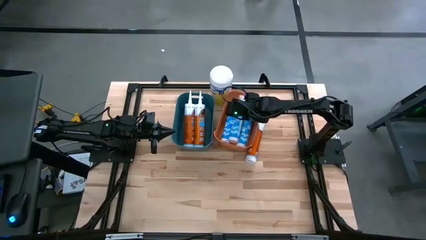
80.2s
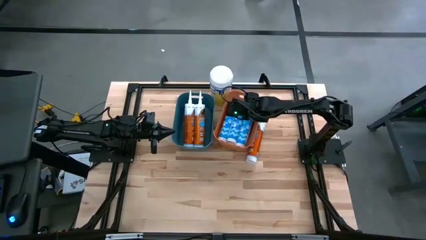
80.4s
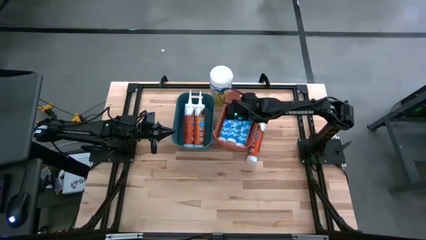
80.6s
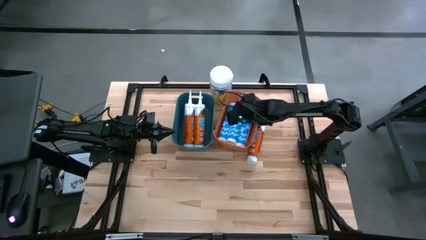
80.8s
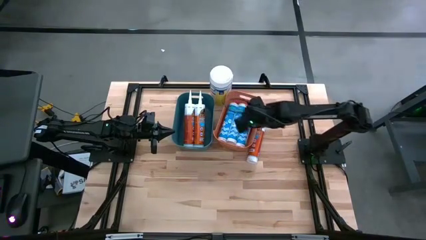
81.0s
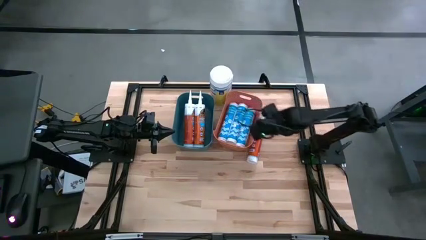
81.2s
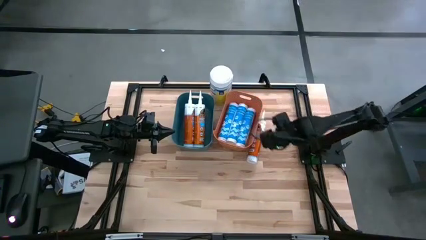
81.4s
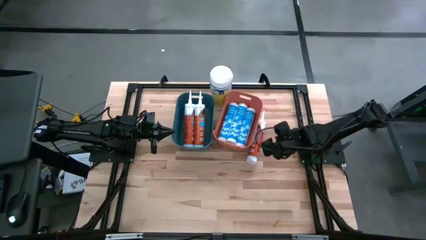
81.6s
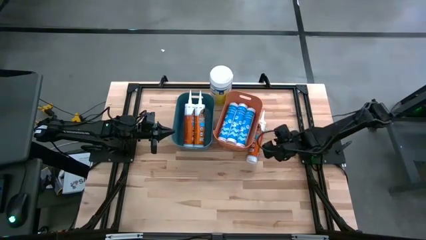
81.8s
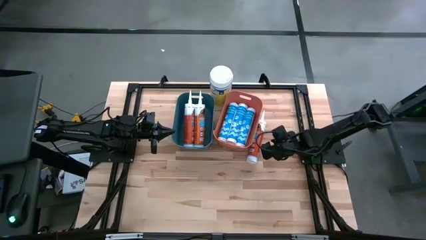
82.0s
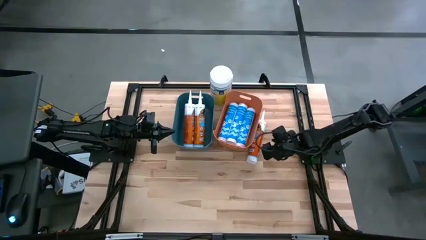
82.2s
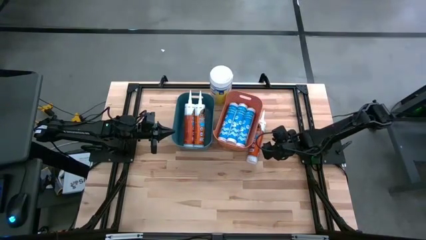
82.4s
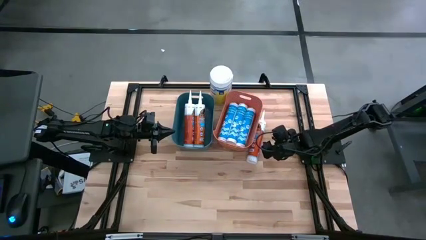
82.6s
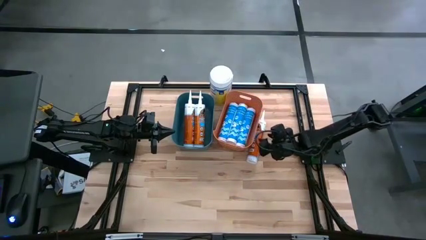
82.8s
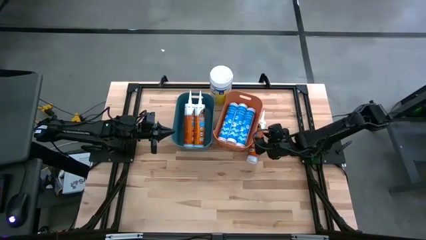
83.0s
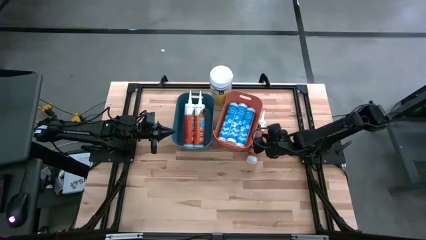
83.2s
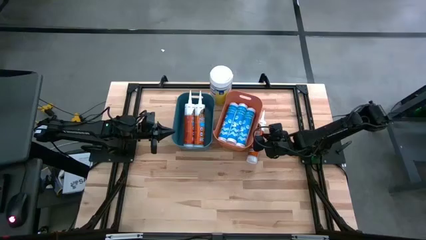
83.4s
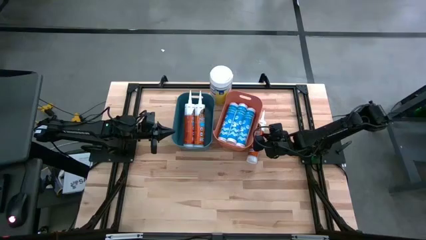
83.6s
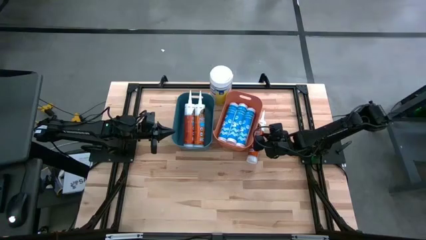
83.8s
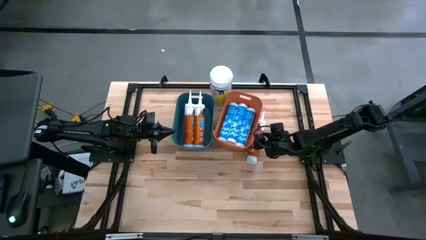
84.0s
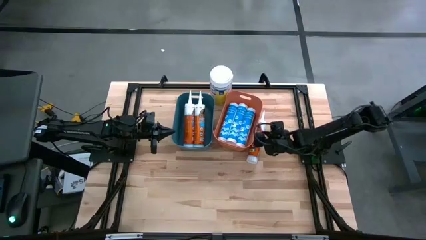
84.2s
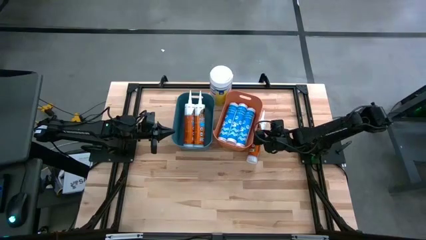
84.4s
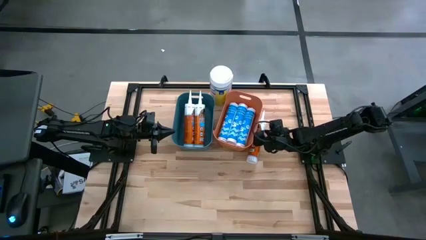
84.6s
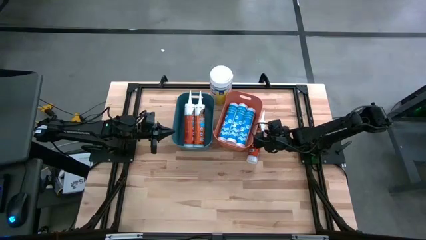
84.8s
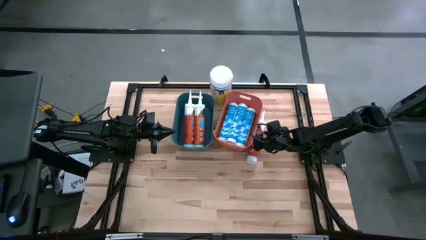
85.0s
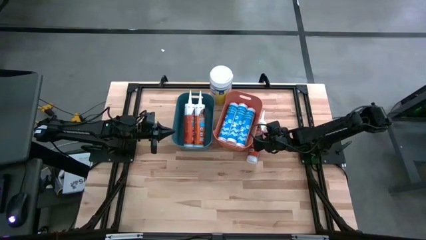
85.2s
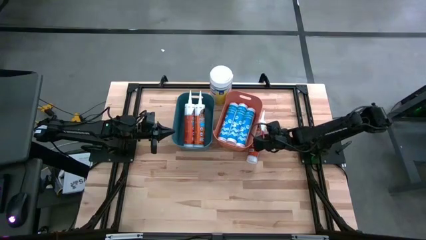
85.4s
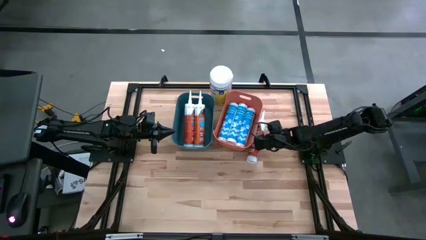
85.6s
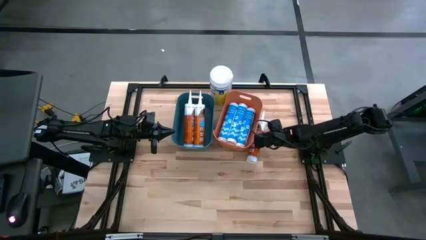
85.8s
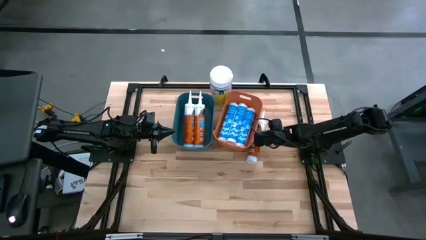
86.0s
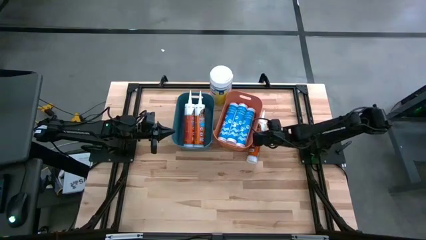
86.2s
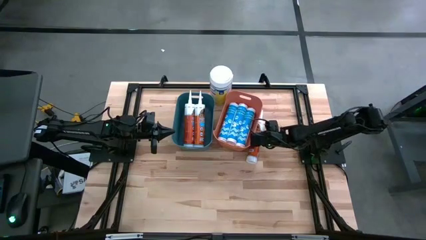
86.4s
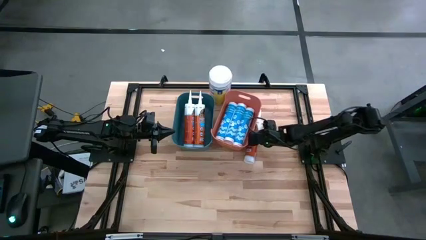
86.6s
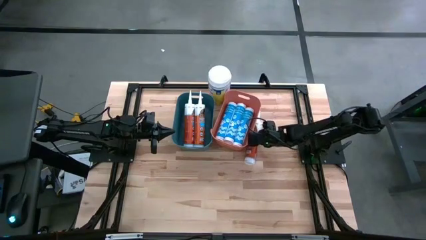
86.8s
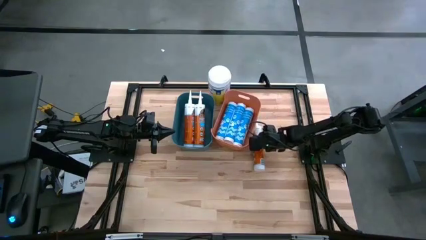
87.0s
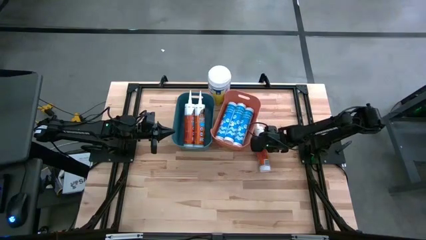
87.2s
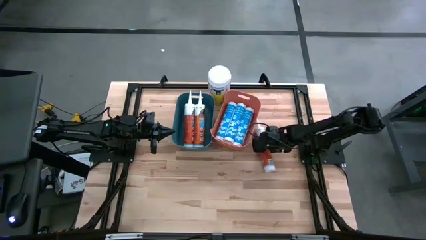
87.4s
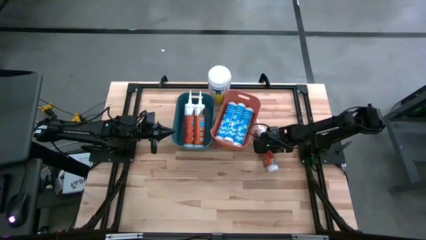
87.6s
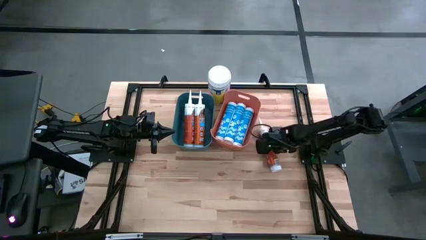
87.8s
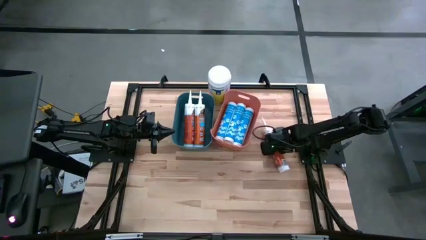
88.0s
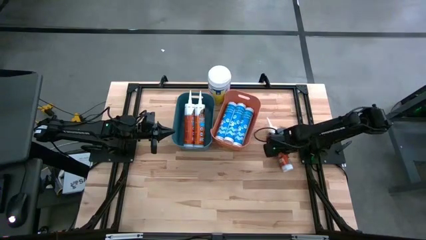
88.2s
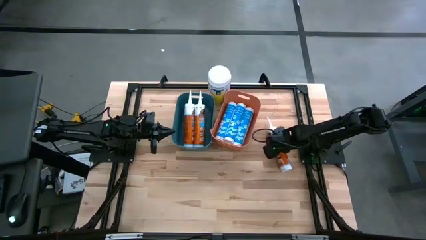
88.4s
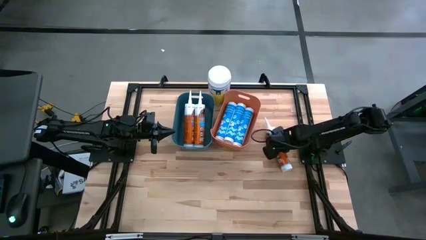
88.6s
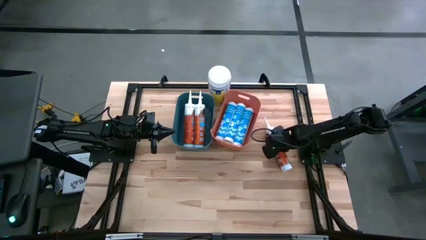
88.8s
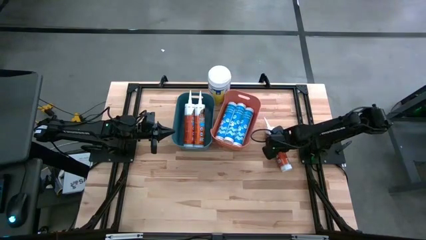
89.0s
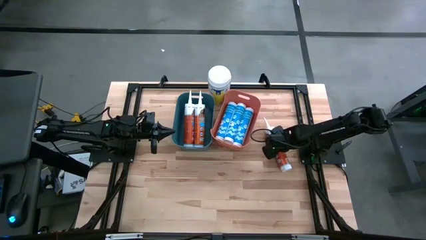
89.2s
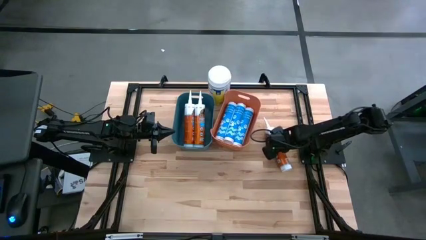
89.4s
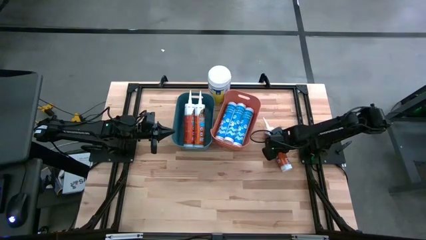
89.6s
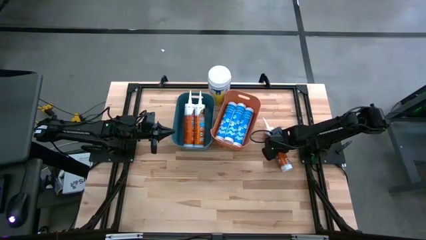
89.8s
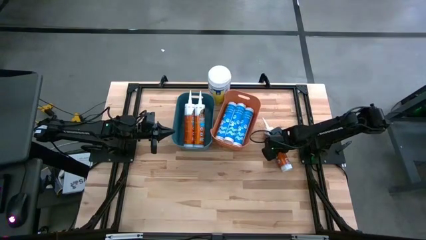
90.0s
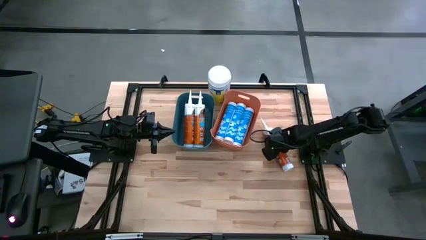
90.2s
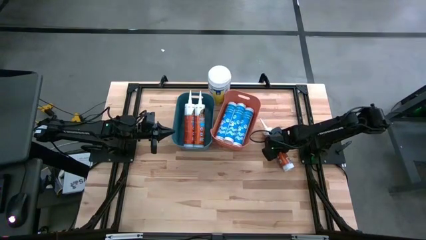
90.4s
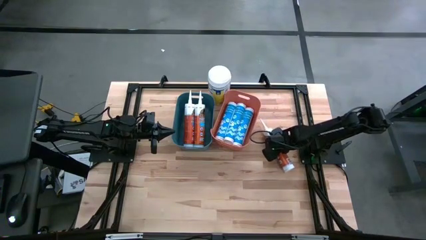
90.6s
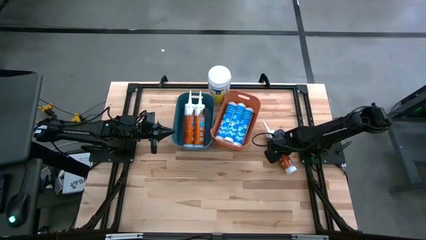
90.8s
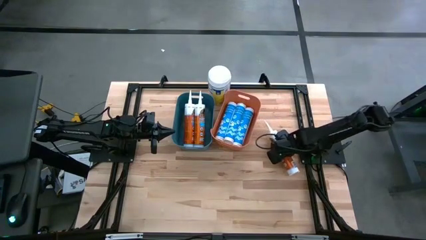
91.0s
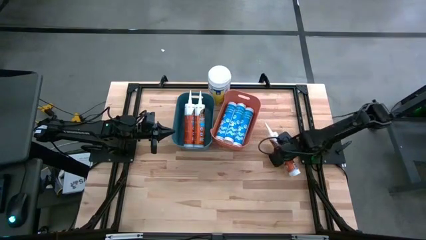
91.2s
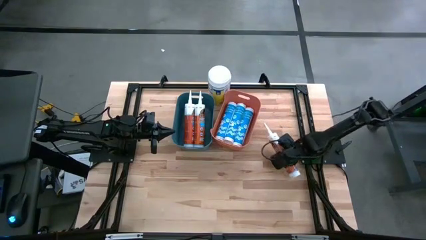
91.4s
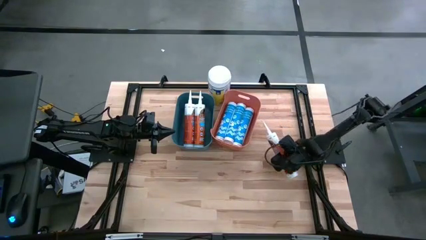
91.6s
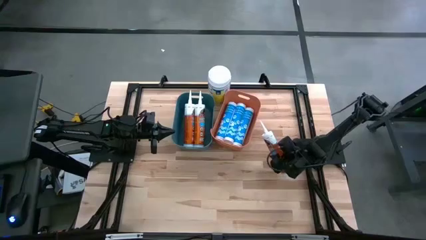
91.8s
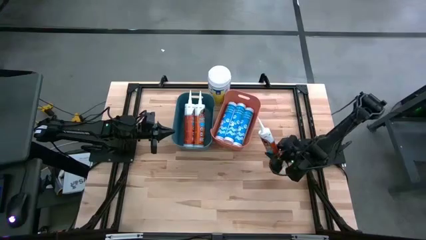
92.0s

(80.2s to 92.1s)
Task: Pick & place silicon tubes, Sealant and Lysol wipes
Put the orange sealant into the blue bin

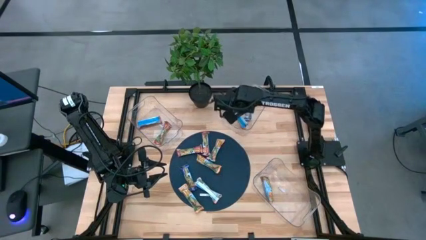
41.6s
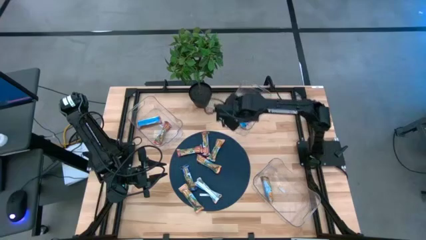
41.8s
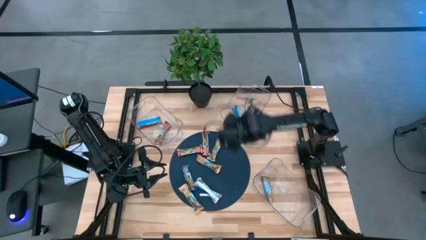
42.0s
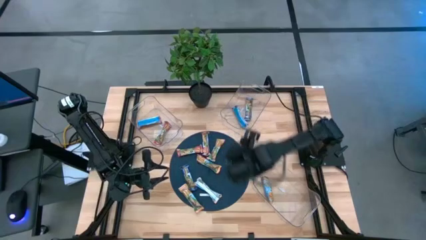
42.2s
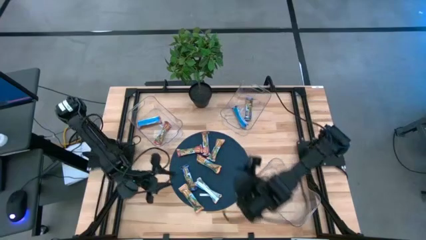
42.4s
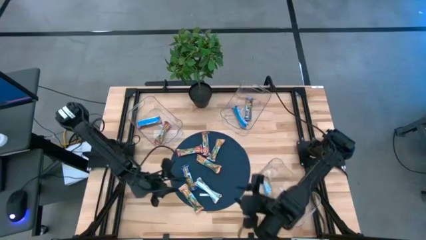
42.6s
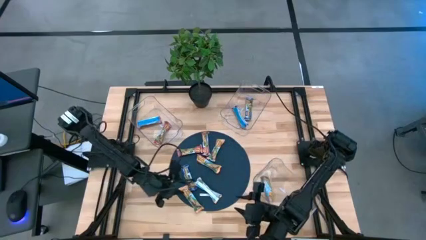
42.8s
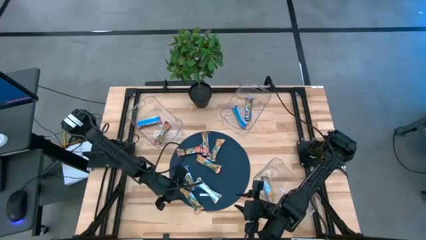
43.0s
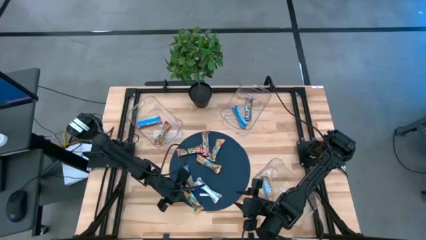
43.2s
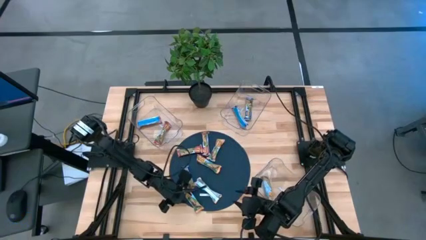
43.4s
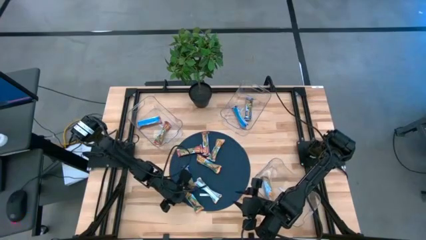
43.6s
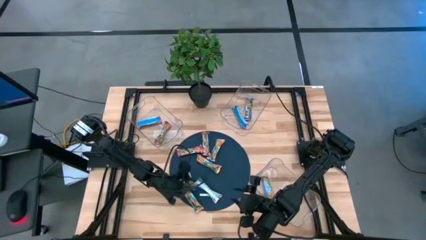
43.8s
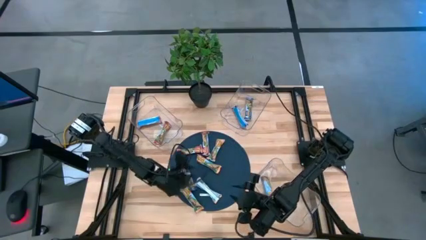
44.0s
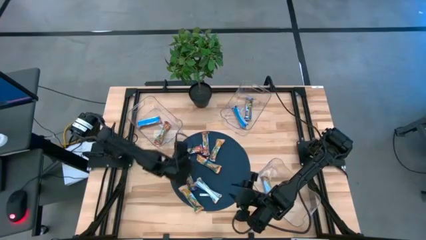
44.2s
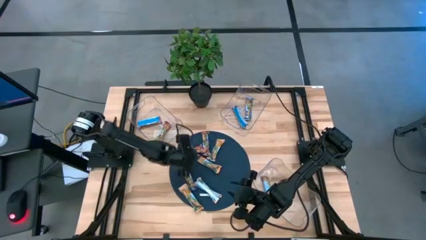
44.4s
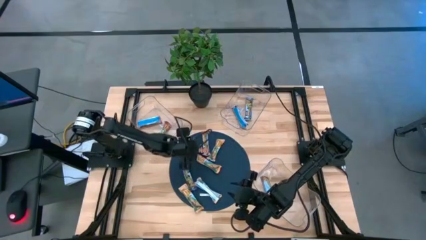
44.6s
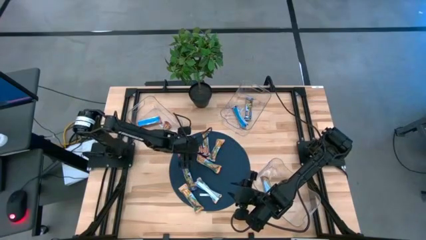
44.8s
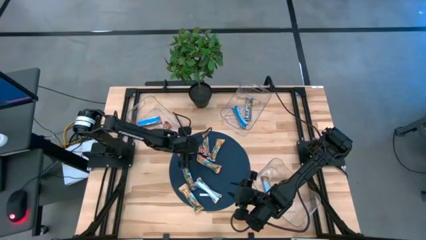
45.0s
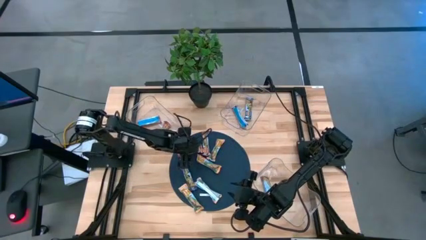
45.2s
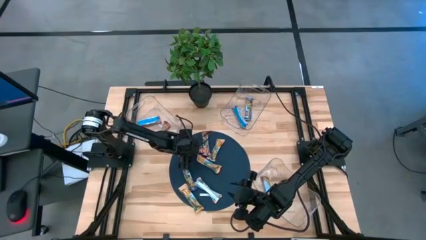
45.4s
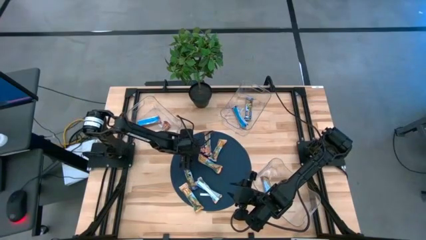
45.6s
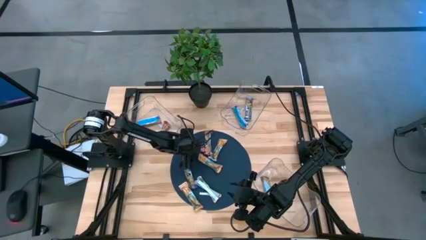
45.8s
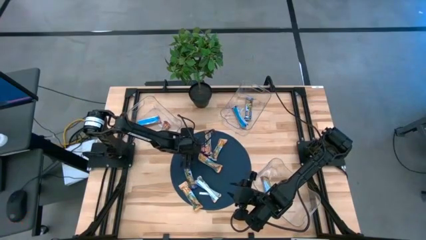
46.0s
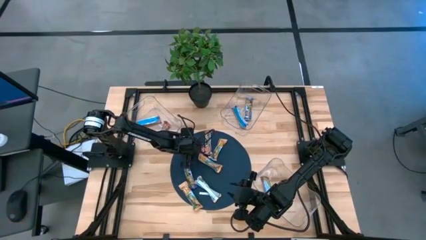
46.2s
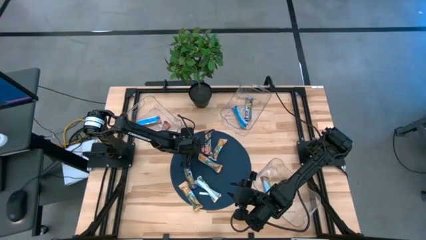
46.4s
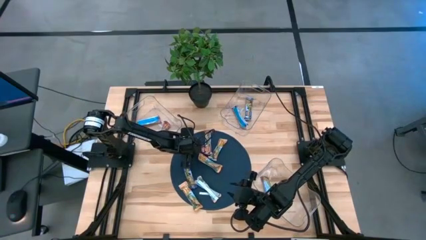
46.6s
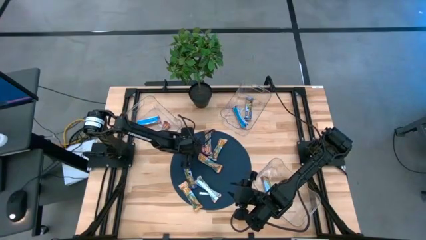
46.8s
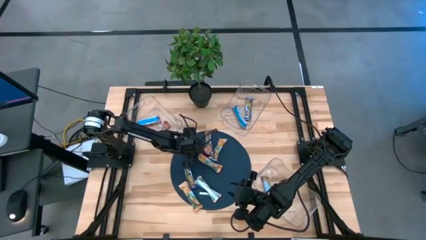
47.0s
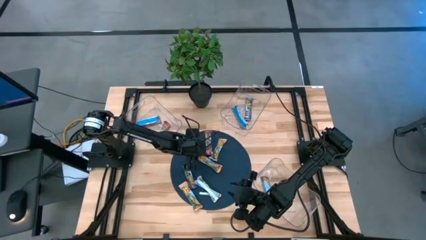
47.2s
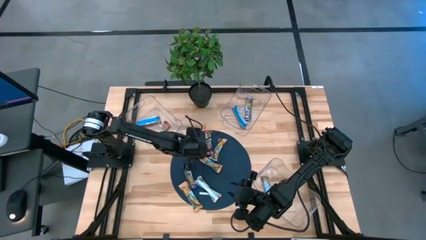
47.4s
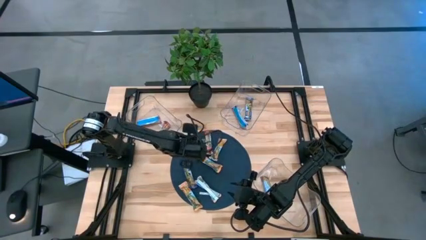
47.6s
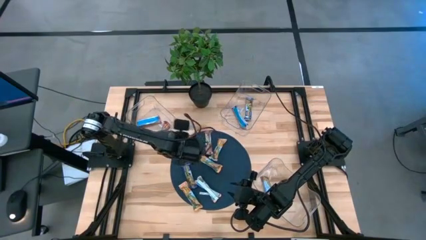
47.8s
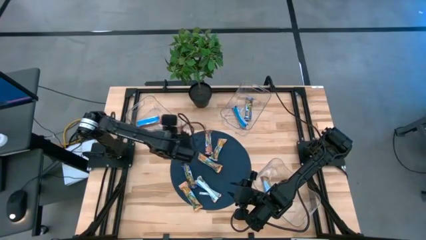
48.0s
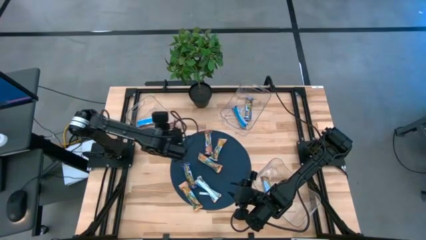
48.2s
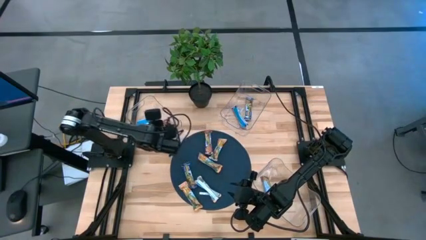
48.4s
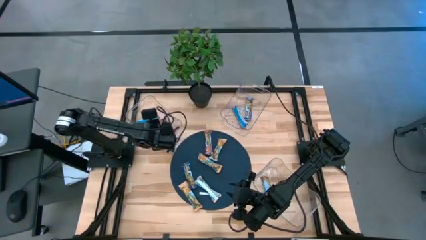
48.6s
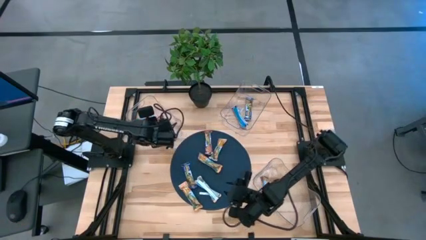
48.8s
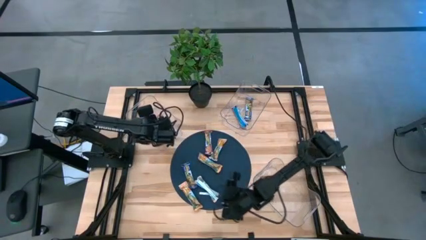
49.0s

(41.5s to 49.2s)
Task: Pick and place Granola Bars by type
Put the red granola bar into the top left transparent bin
